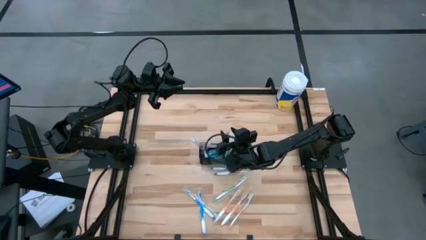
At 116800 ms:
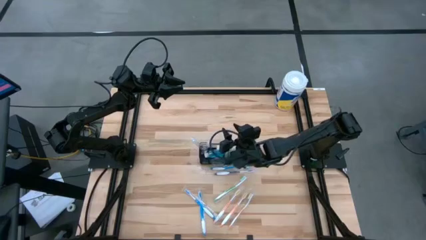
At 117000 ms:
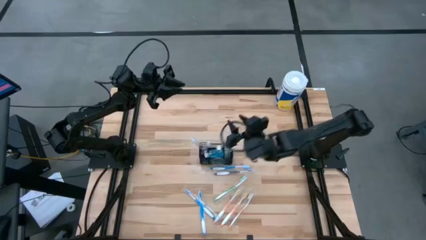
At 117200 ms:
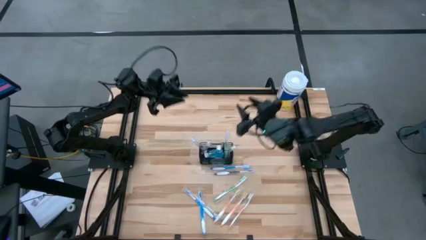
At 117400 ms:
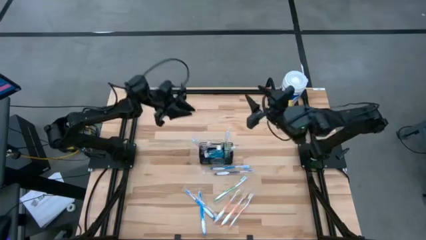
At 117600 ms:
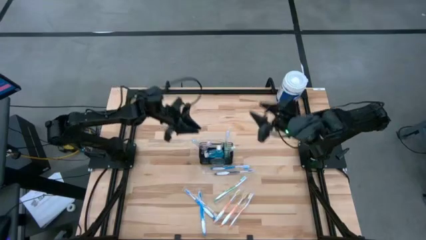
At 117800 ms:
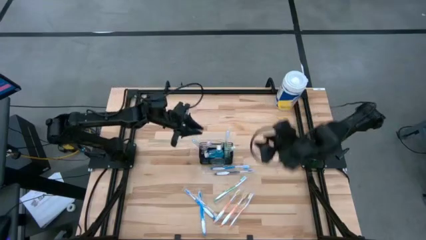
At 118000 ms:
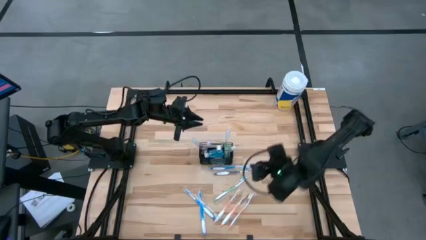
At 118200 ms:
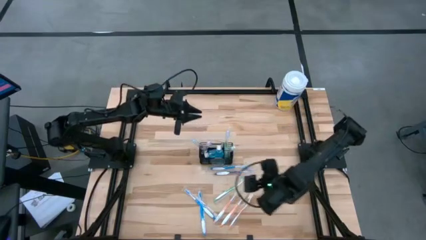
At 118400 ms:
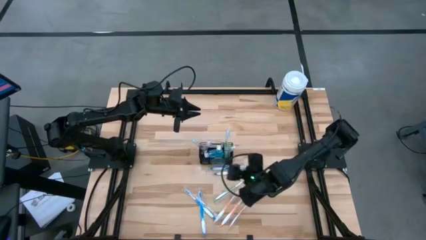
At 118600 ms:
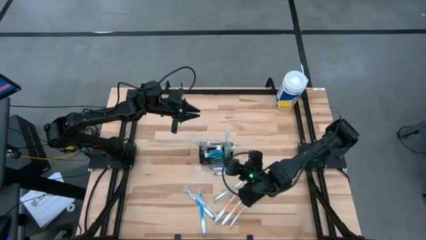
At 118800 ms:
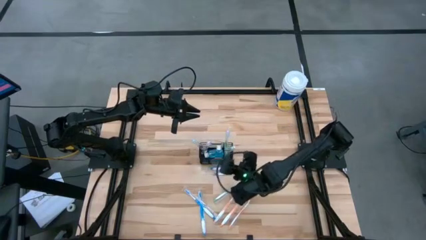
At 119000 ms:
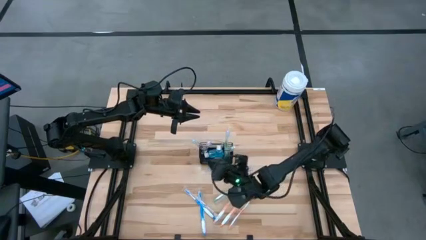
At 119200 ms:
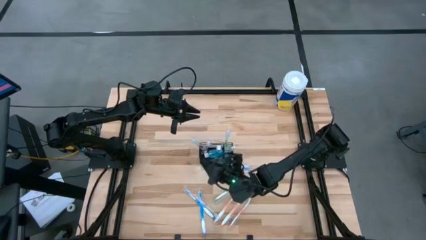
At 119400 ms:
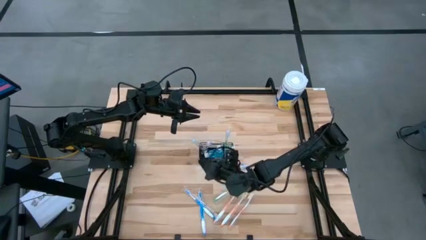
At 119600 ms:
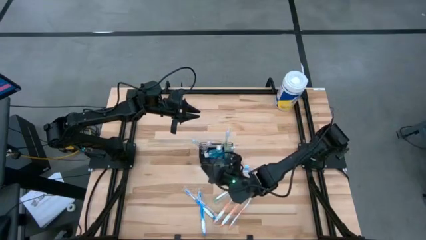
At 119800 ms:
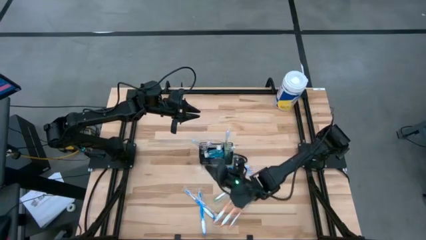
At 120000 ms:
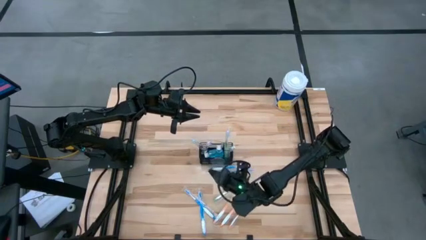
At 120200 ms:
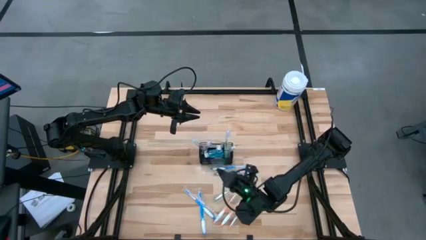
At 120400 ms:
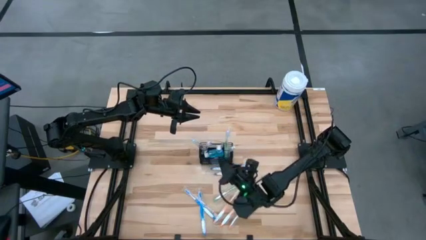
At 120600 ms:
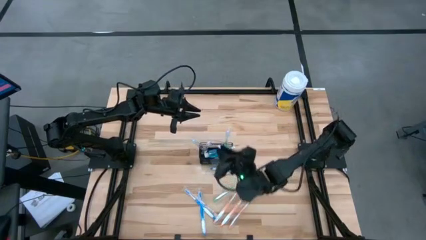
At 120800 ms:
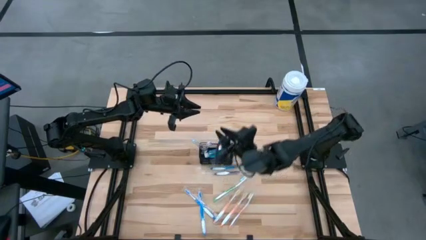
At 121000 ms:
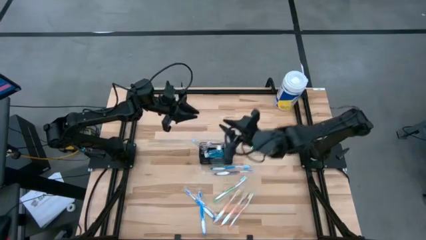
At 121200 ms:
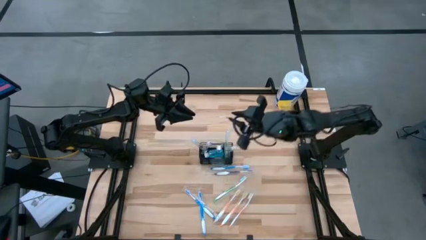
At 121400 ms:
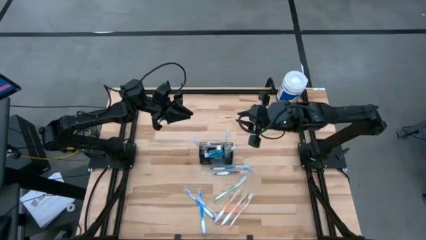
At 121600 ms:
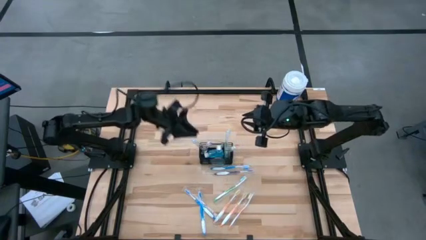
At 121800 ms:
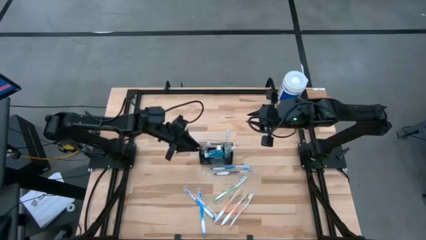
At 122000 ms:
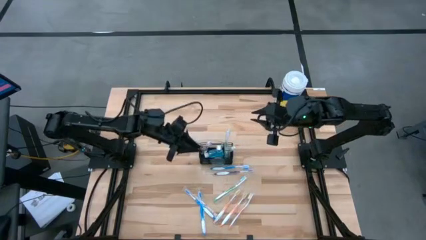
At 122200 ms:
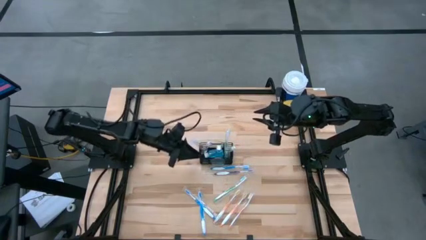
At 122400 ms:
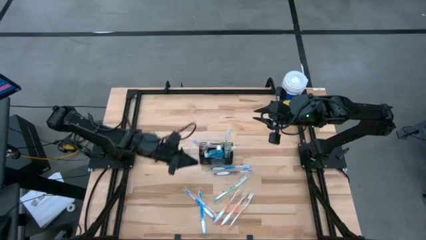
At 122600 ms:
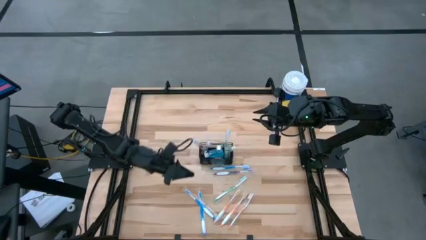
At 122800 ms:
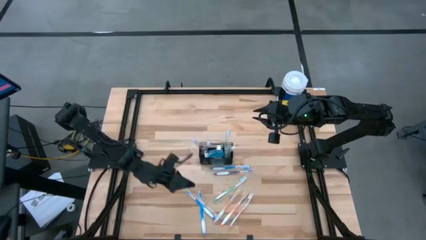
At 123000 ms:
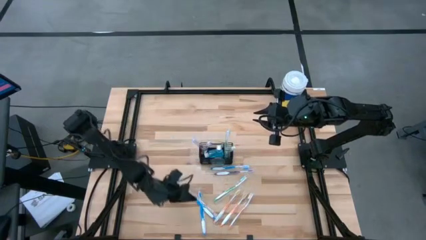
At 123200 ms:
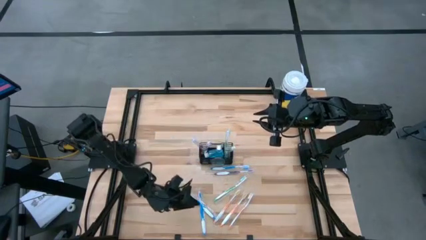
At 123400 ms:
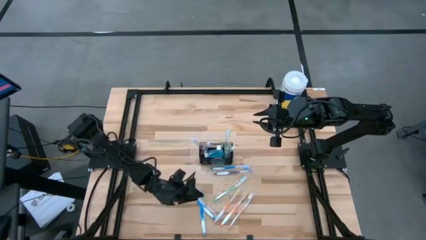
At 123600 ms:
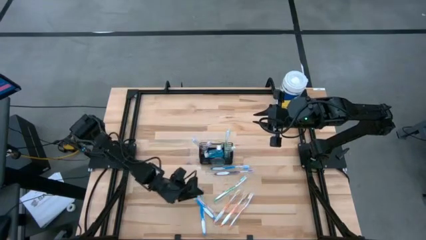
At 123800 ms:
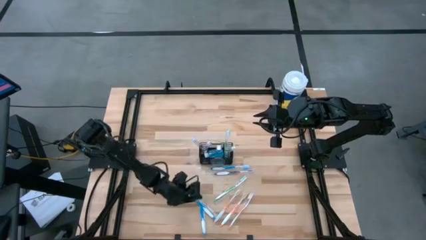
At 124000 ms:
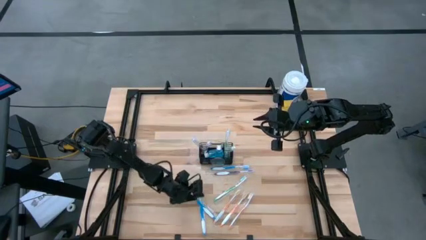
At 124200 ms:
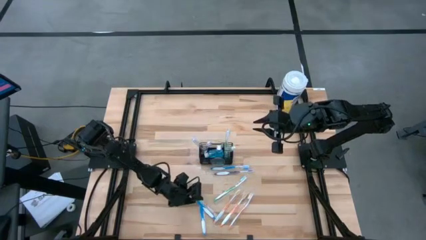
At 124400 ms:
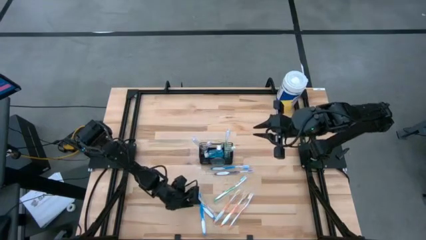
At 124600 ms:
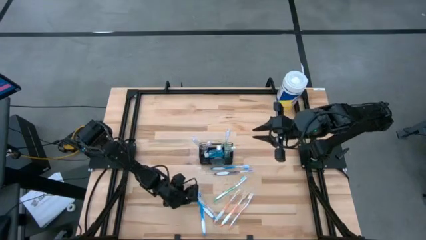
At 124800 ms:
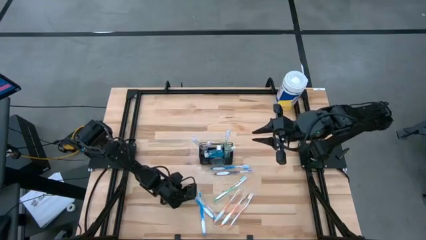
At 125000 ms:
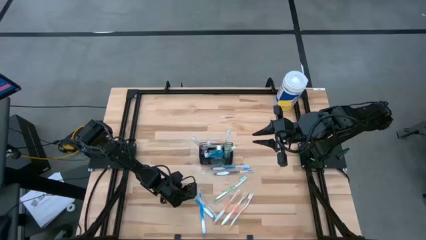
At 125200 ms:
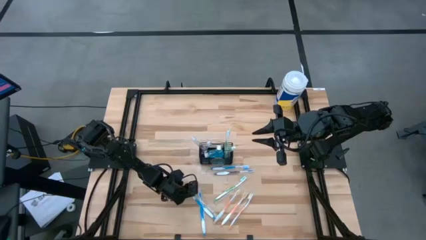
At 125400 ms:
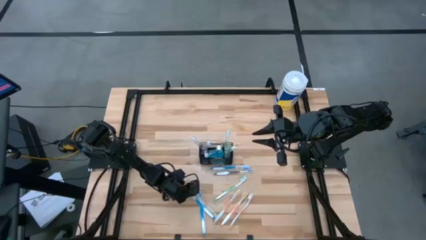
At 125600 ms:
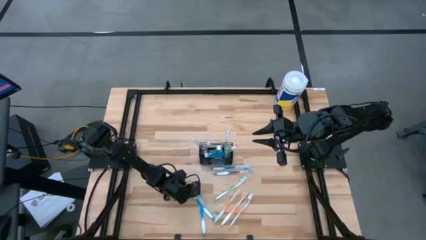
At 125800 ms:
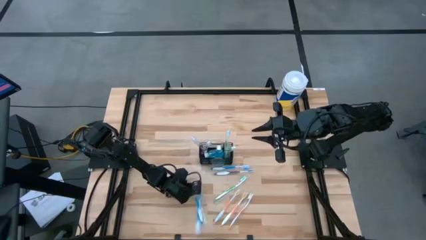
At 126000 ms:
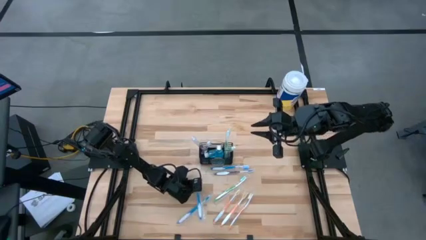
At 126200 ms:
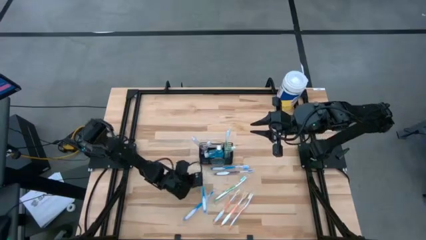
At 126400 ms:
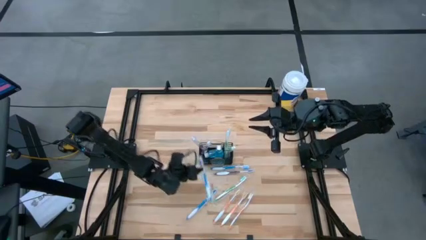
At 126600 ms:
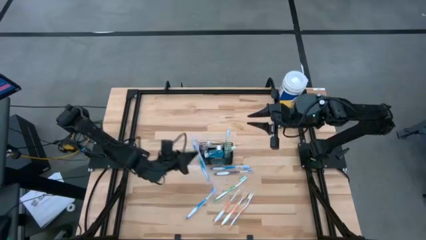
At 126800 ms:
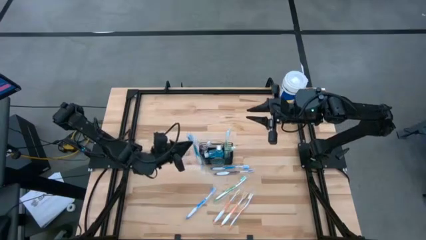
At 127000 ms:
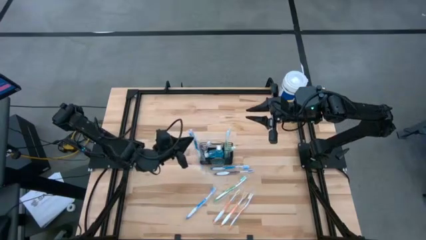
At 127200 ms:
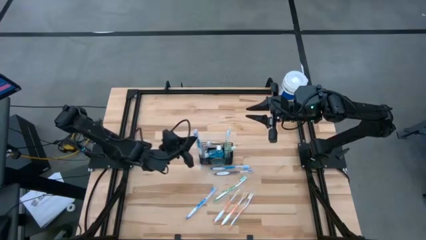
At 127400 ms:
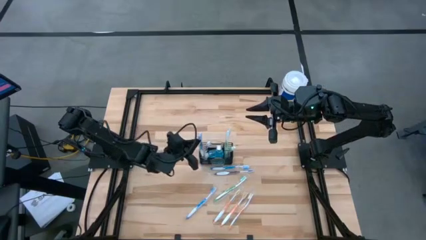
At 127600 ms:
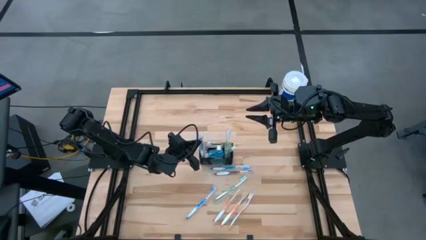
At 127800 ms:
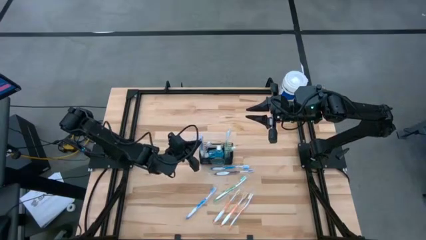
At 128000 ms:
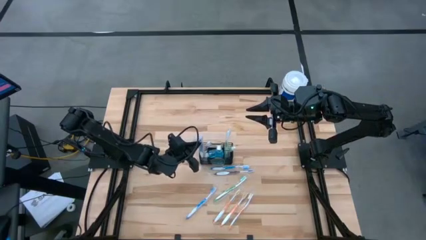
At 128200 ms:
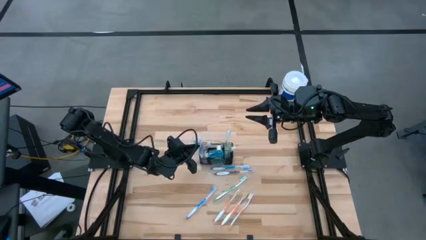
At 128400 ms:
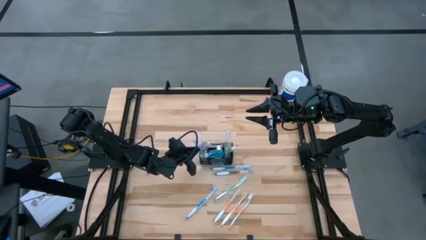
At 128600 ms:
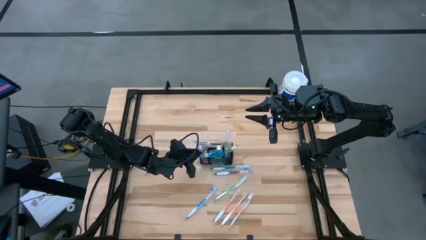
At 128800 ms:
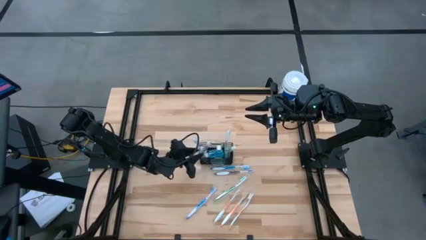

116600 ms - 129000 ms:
Task: Pick & Place toothbrushing station
Put the blue toothbrush into the black wire organizer

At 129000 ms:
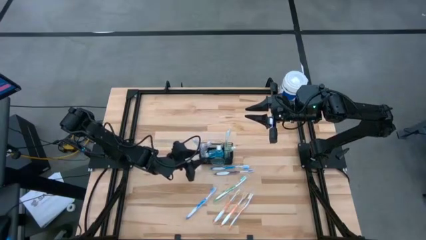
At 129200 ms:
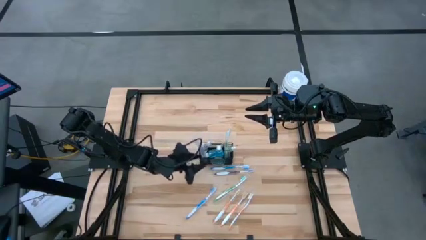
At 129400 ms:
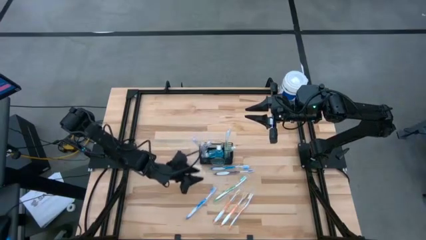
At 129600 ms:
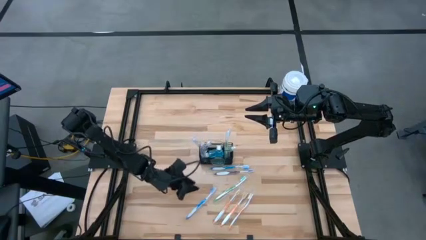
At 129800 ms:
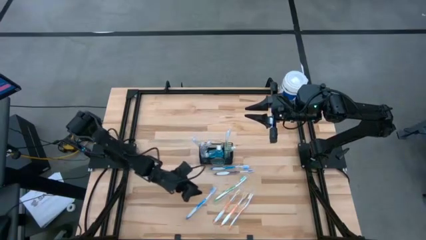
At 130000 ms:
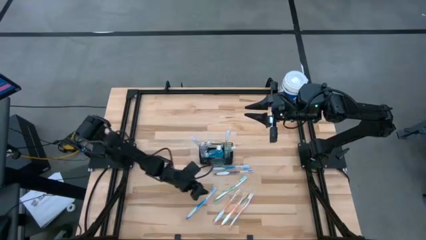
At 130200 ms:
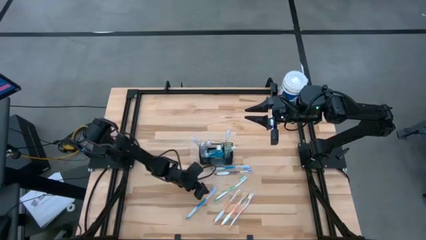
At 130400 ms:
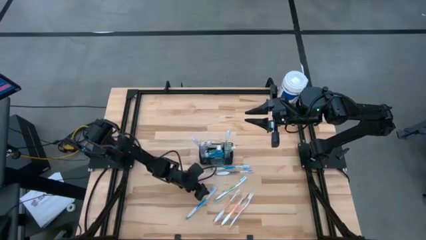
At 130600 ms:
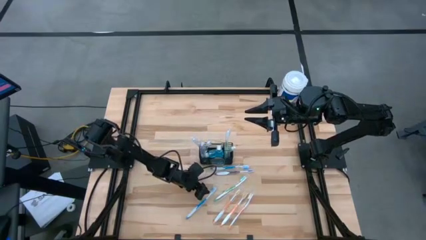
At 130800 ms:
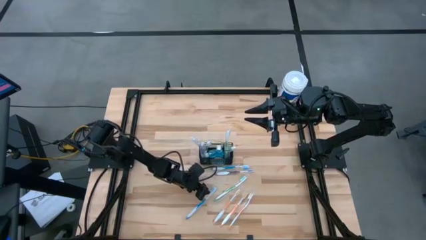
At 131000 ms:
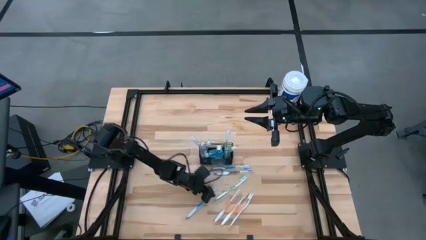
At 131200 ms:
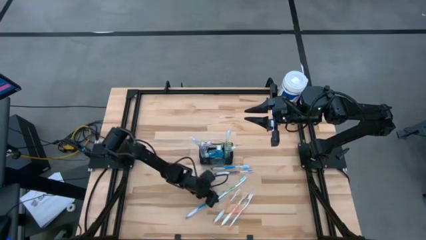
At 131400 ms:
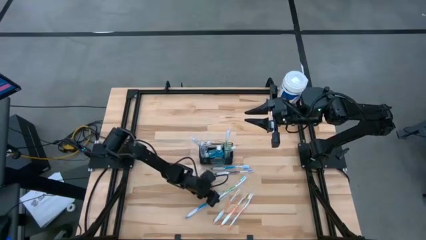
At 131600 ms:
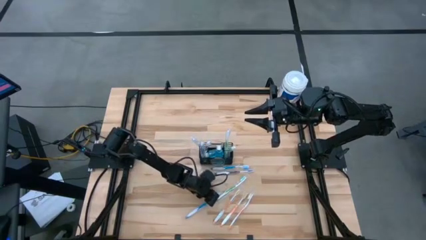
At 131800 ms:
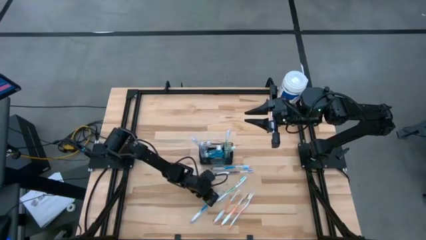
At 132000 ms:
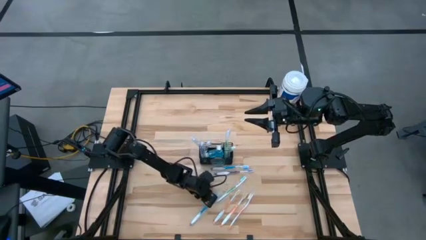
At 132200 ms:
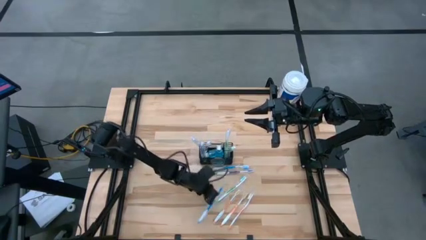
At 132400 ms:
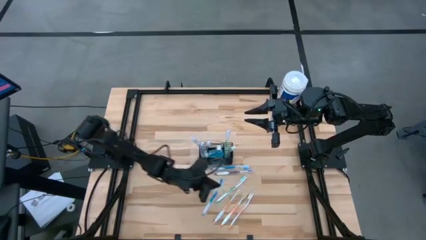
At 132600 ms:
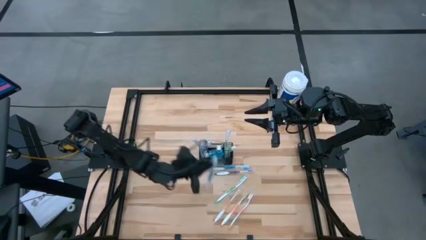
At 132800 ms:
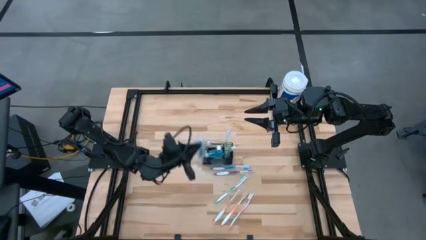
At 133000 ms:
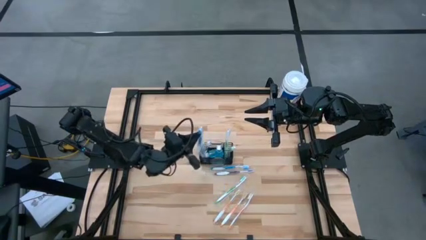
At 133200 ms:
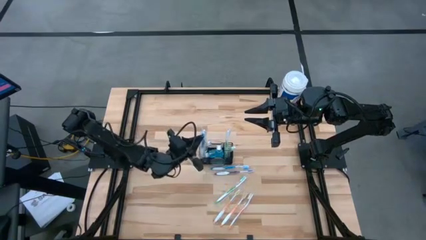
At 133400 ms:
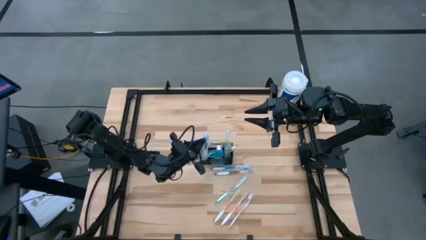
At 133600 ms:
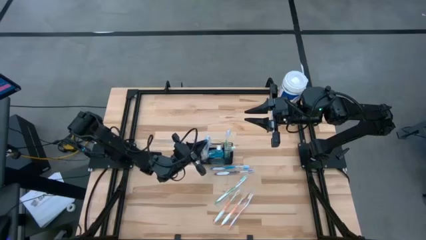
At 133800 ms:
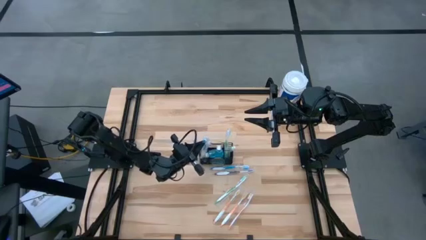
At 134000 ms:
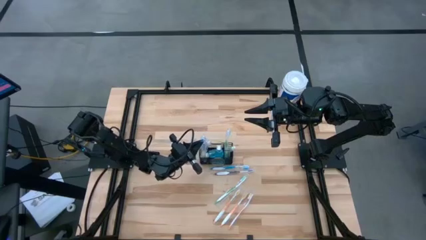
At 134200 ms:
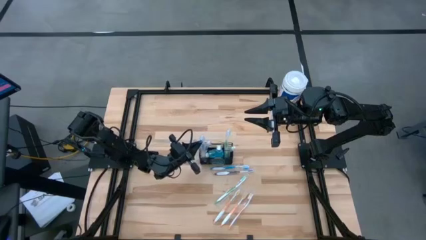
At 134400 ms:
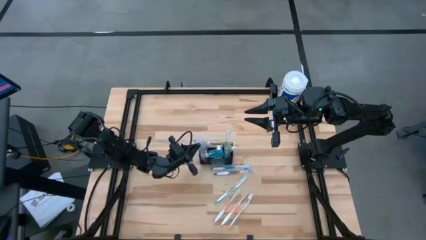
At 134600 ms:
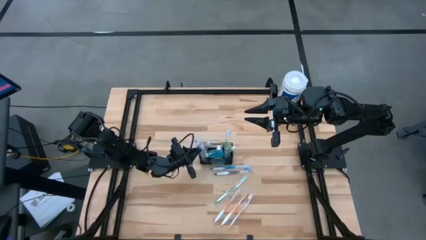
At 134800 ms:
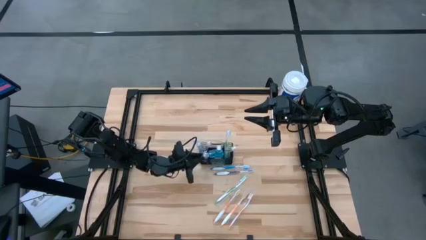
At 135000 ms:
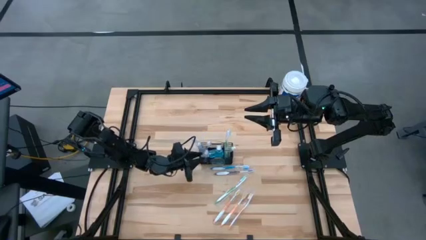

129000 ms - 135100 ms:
Put the blue toothbrush into the black wire organizer
